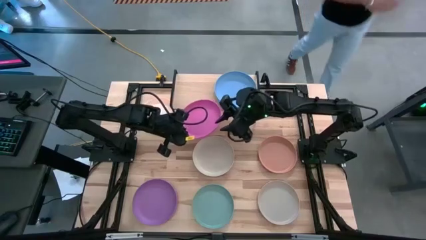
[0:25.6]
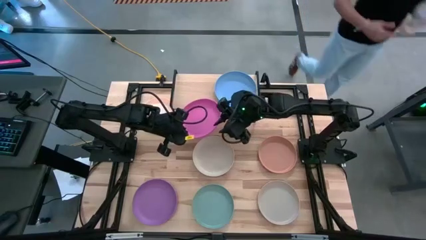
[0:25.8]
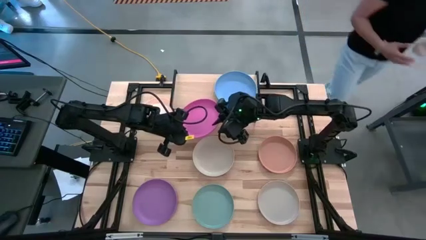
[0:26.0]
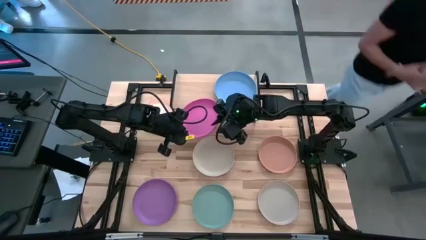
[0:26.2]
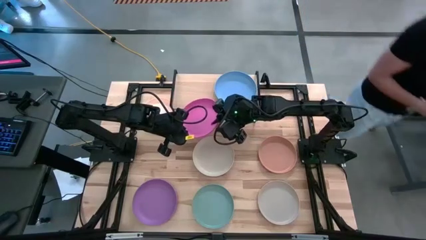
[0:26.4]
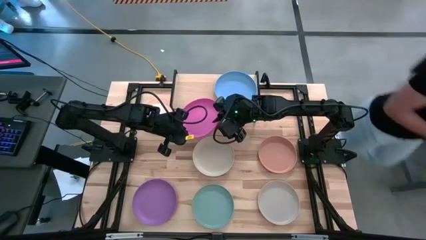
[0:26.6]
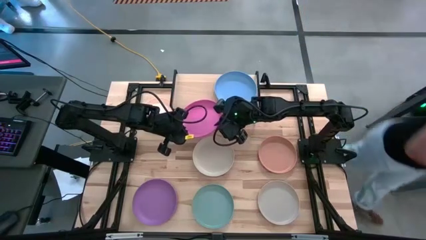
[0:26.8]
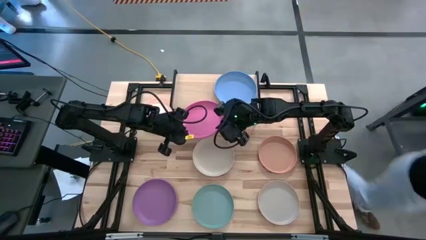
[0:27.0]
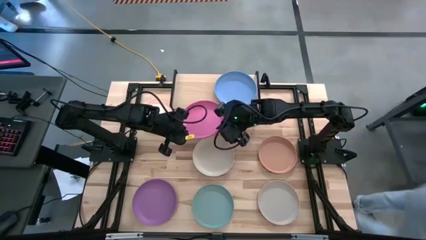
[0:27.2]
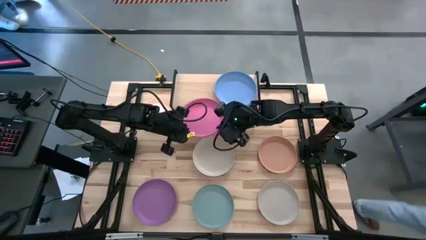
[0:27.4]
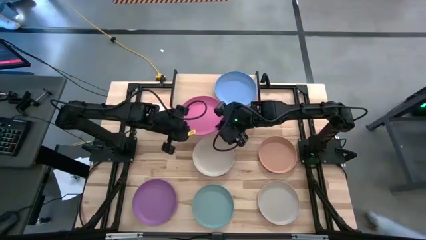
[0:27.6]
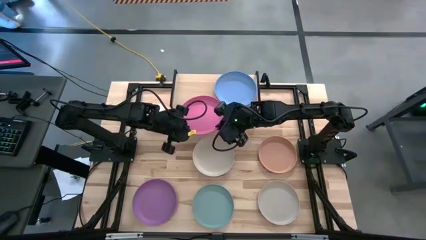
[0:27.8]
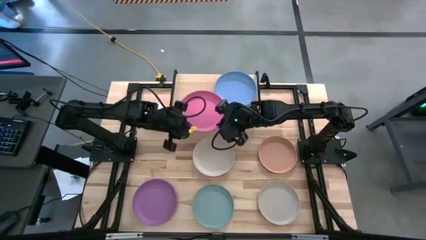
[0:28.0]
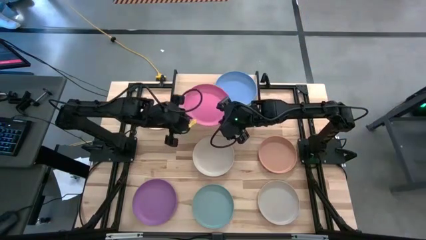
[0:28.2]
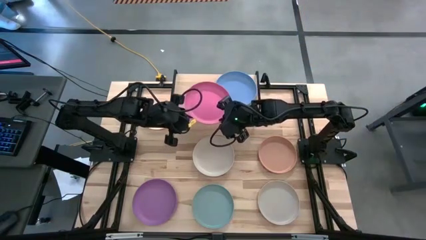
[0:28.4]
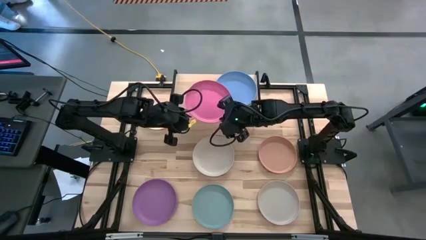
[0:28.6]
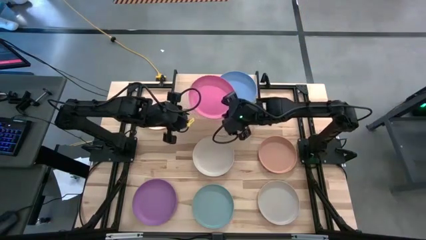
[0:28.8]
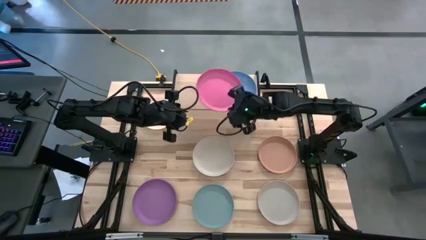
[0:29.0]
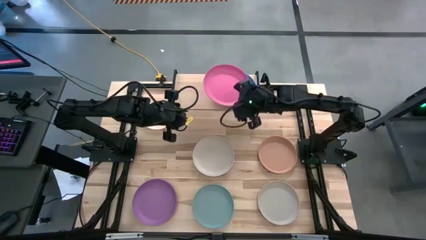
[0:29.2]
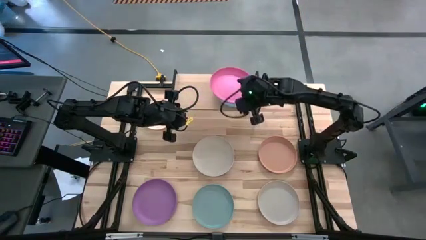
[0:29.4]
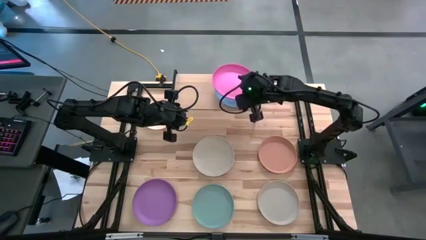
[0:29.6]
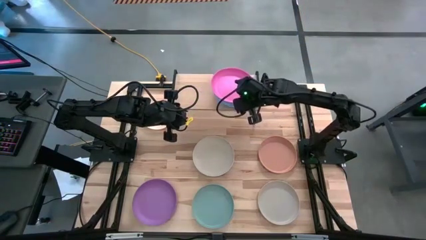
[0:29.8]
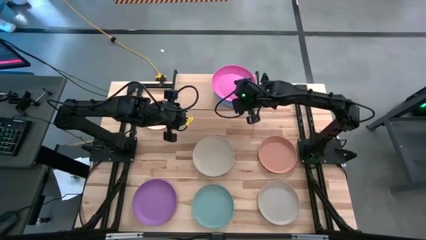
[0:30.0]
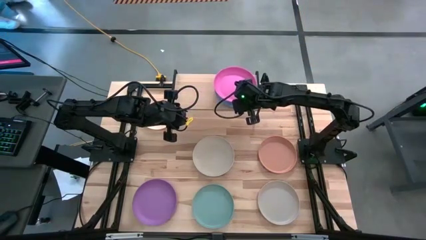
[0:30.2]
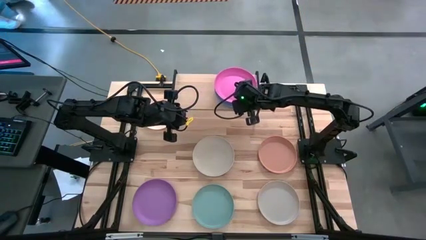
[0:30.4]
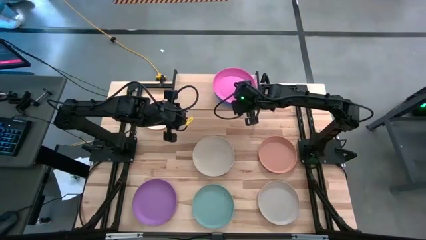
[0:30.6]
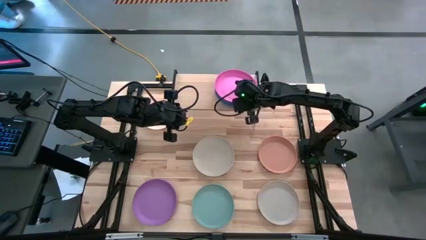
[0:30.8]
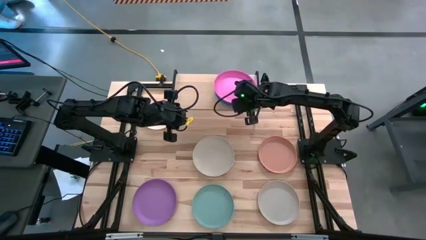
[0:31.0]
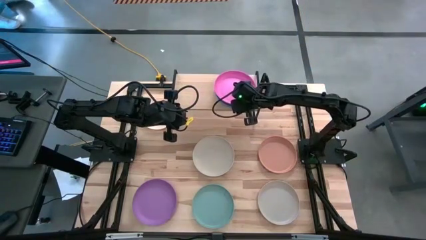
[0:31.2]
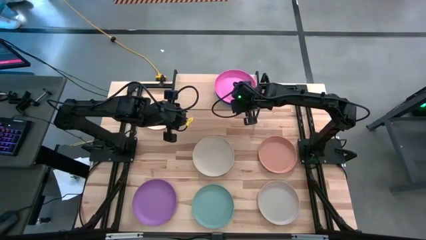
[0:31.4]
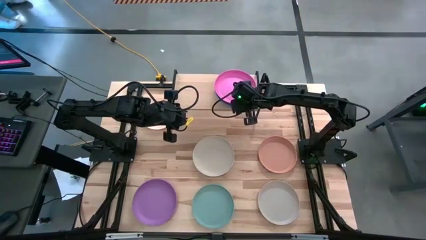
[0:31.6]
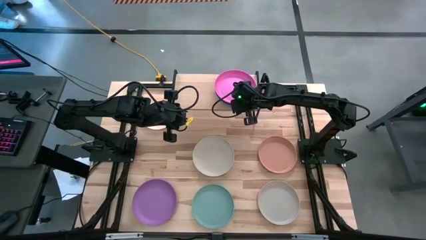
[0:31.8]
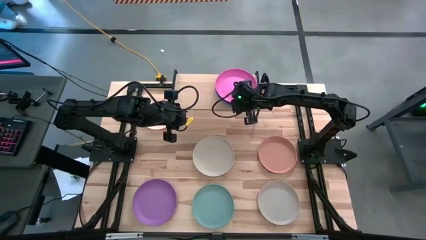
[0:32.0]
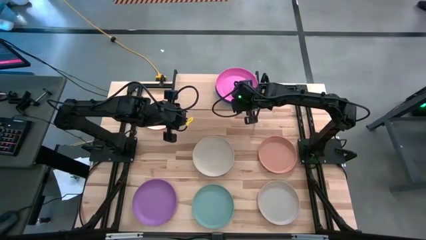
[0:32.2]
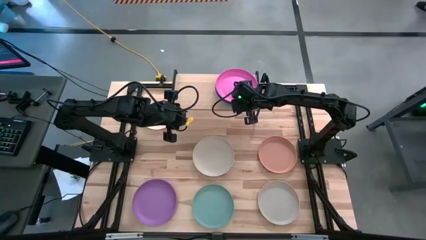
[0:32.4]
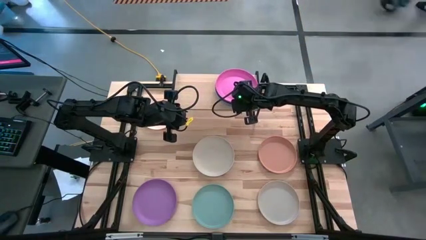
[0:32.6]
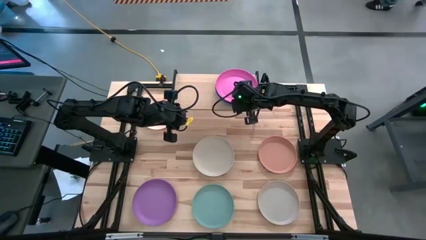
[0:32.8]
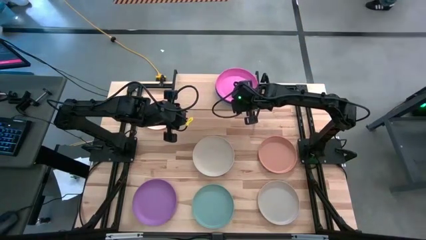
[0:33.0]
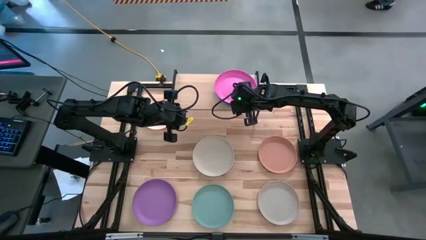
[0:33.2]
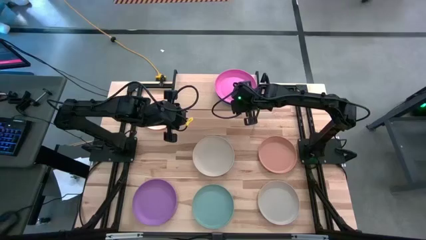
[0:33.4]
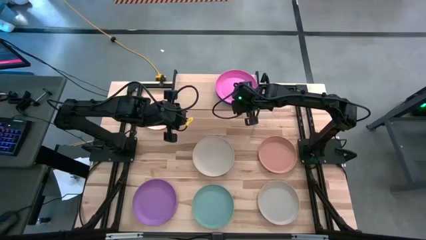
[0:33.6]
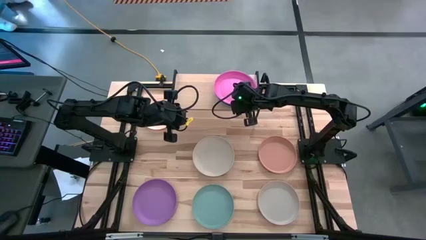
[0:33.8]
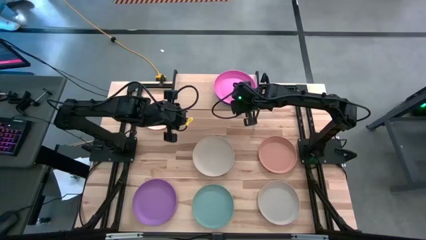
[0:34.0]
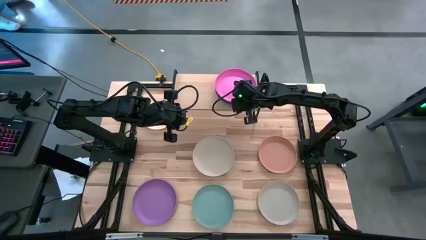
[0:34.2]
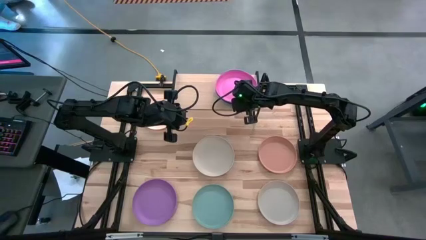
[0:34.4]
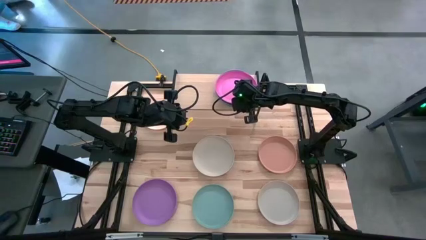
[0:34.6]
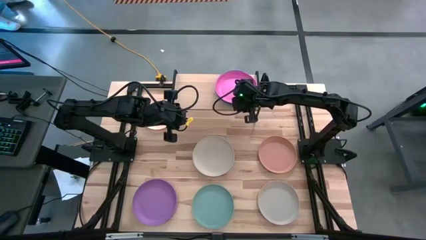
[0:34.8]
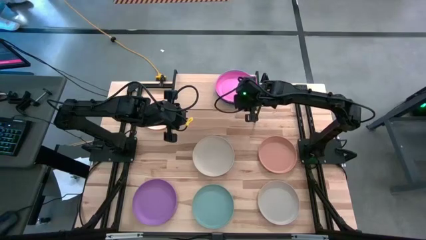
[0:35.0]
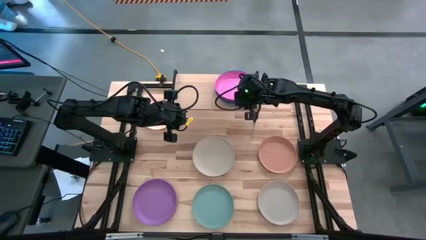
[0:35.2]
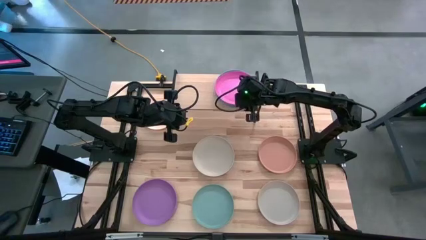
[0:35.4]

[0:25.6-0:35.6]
Task: Place and stack plates onto a shelf
Stack the pink plate on top of the blue plate on the shelf
